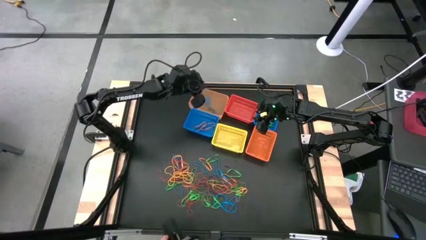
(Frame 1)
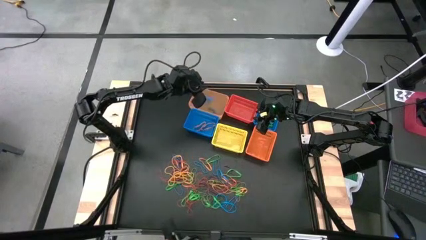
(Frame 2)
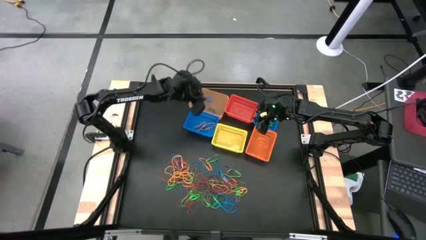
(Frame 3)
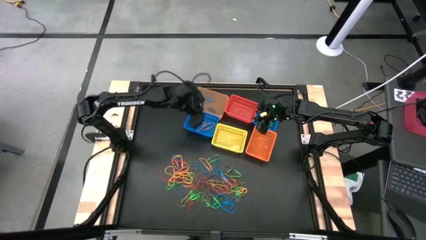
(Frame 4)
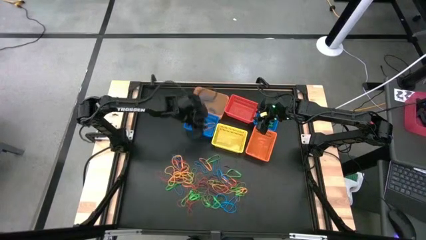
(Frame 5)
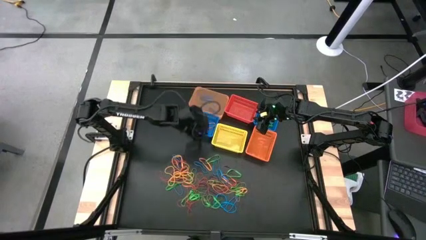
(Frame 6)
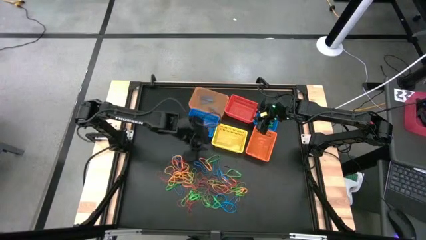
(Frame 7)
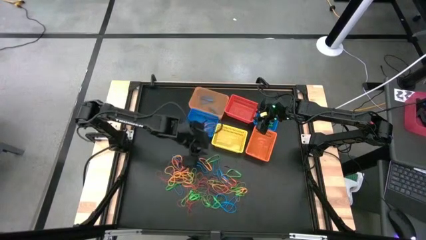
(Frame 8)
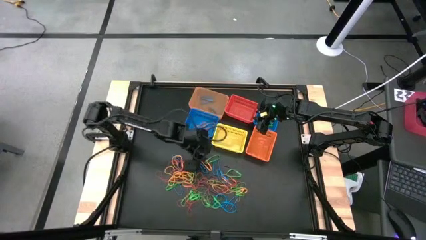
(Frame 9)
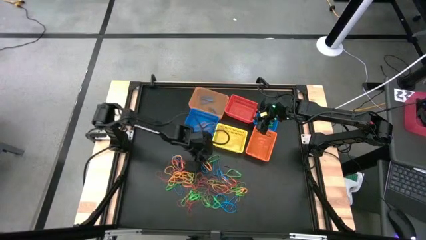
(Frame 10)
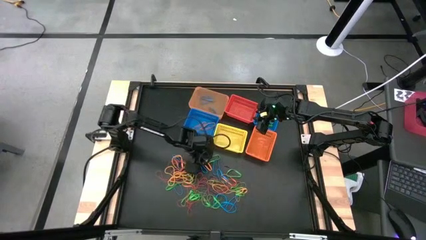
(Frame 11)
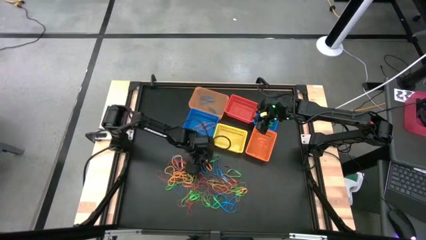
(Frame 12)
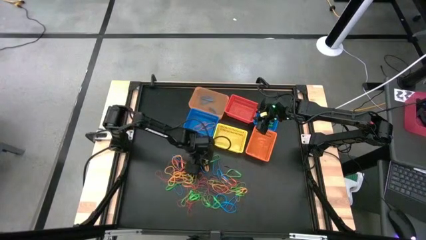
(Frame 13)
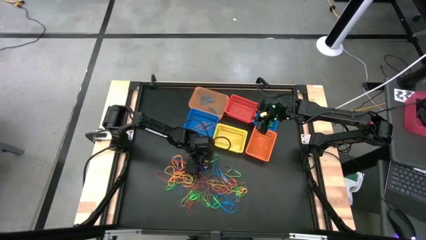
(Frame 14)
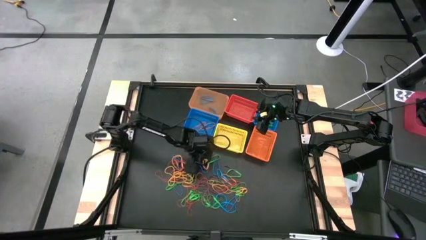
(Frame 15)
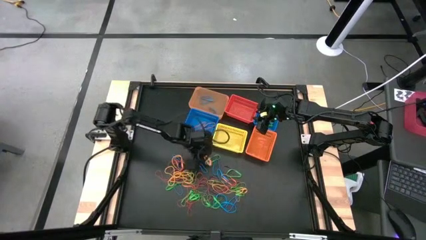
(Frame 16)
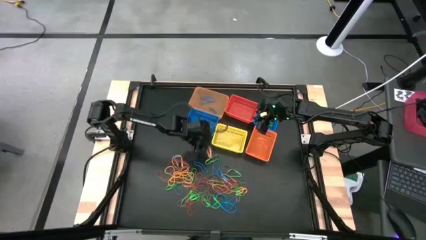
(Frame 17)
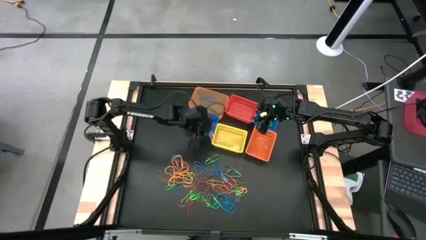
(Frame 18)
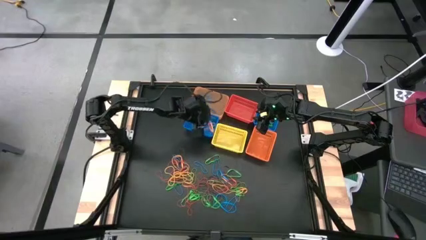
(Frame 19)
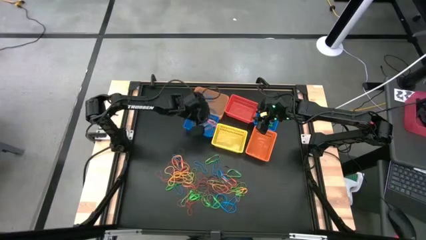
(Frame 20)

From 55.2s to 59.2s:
Task: Sort rubber bands into baskets
Put the orange rubber band into the left blue basket

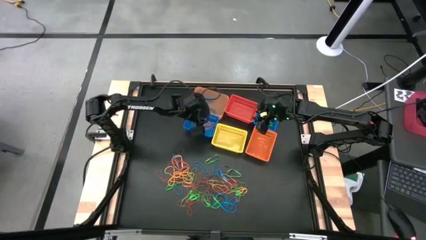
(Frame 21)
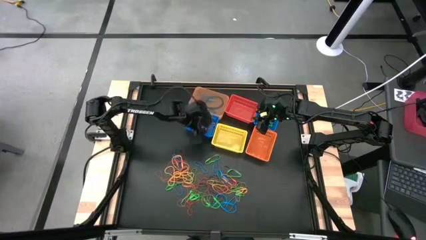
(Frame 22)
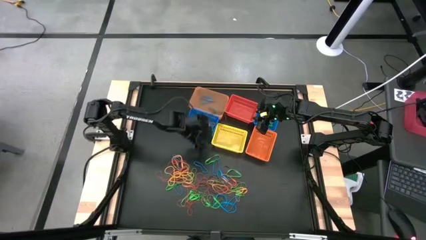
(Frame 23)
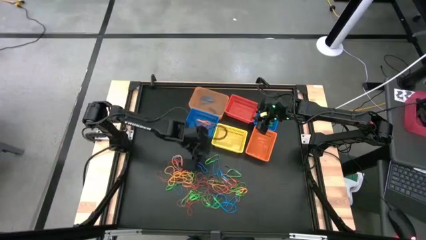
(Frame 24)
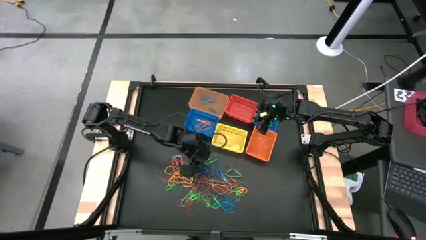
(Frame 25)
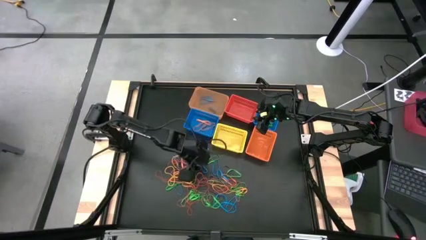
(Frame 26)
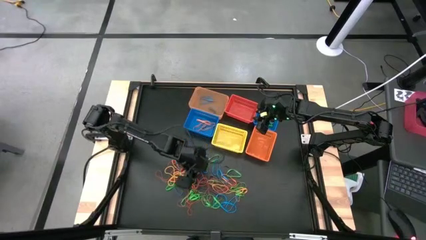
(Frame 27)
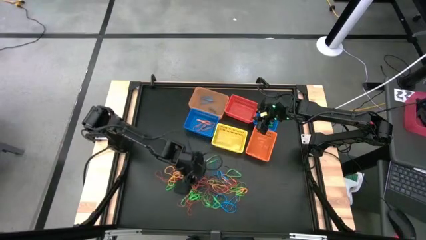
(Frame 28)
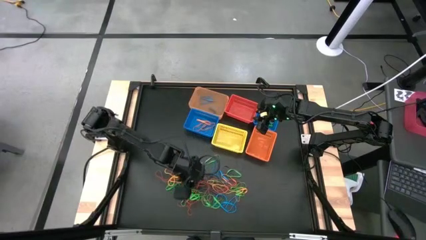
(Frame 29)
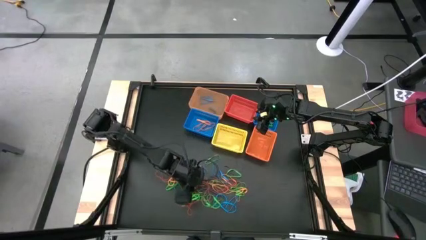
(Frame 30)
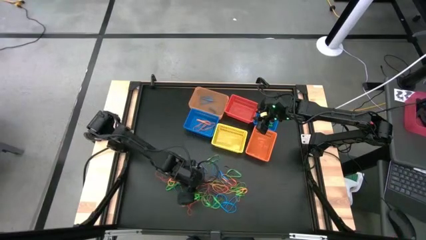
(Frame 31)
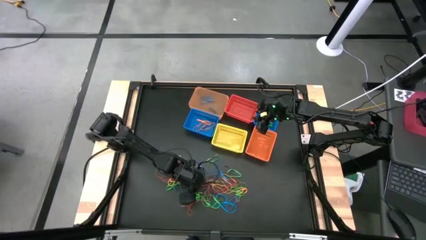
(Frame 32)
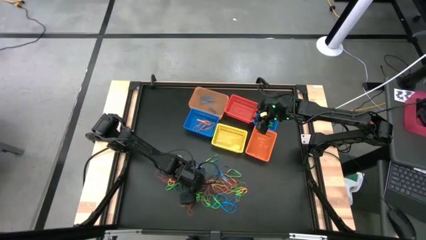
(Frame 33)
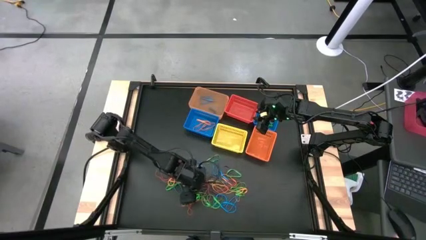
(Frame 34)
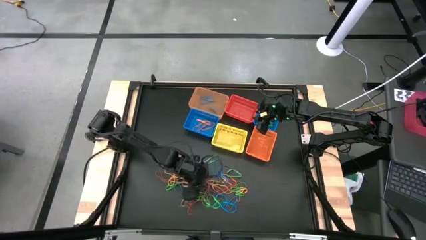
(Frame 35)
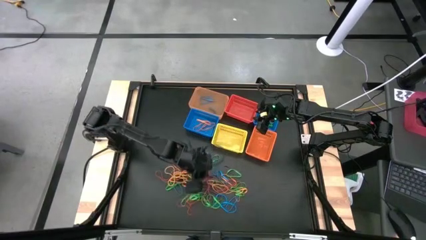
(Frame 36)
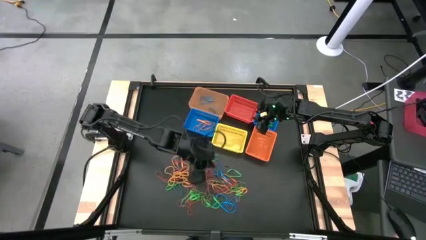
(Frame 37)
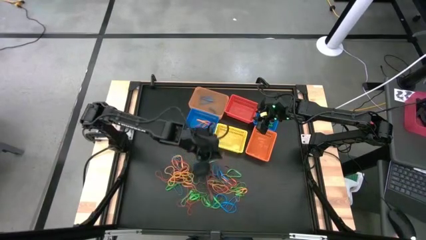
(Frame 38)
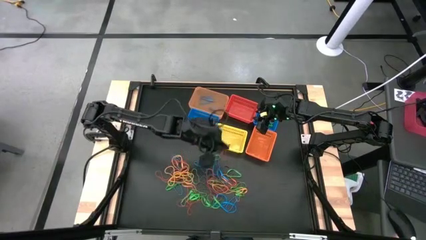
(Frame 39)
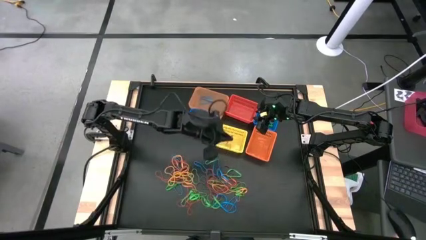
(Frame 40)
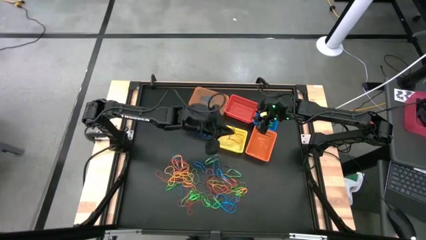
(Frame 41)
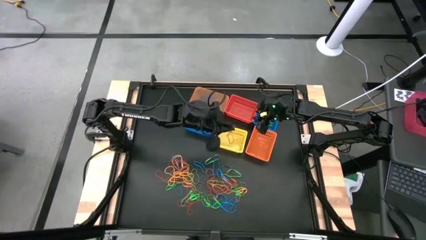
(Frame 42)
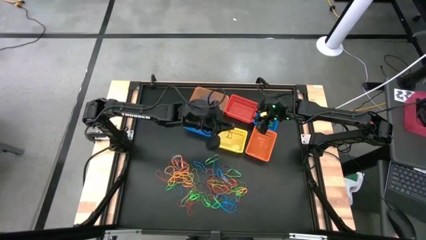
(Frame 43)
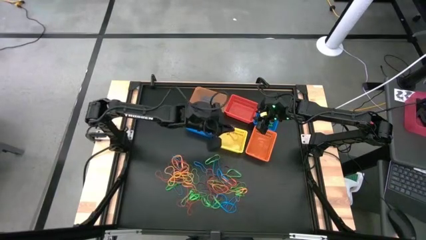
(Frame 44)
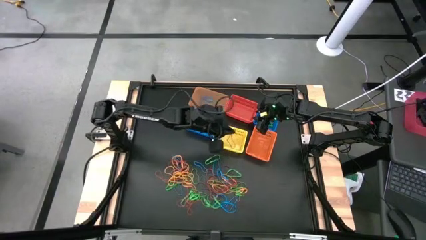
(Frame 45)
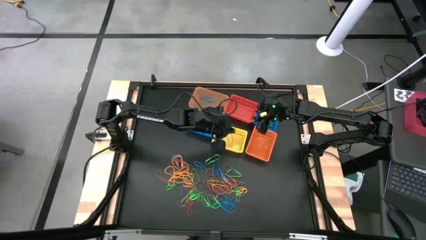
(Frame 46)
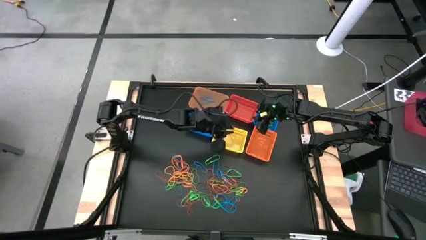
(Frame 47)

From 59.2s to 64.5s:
Put the red rubber band into the yellow basket

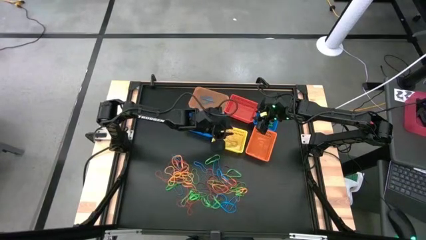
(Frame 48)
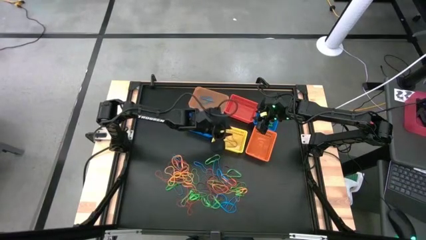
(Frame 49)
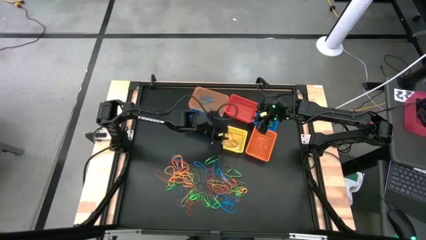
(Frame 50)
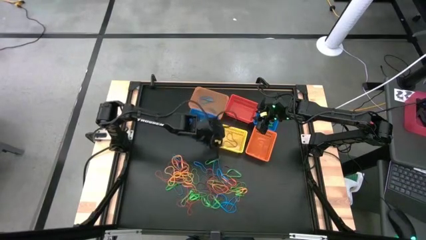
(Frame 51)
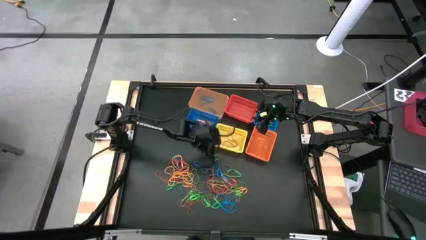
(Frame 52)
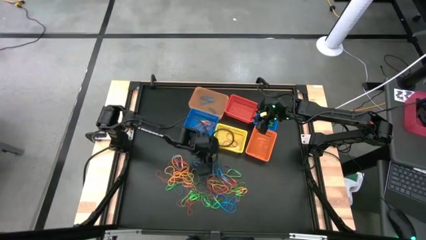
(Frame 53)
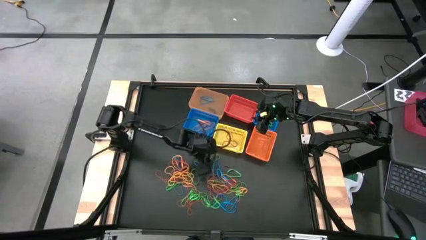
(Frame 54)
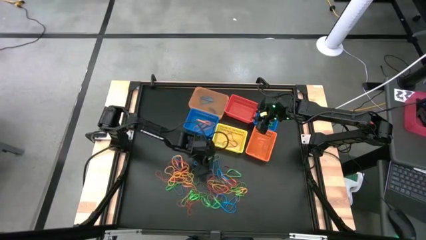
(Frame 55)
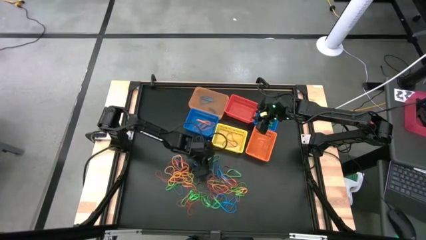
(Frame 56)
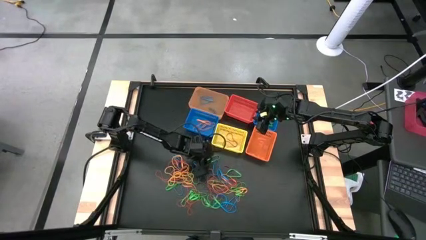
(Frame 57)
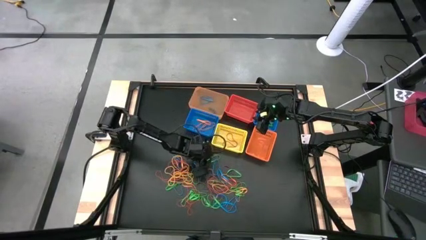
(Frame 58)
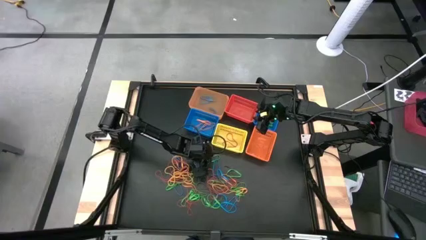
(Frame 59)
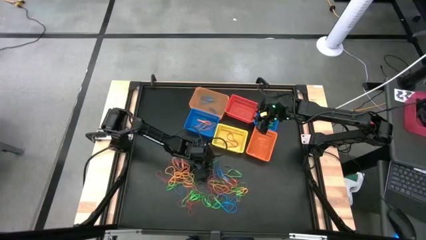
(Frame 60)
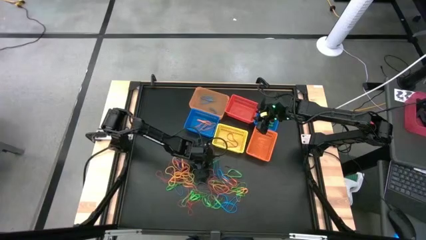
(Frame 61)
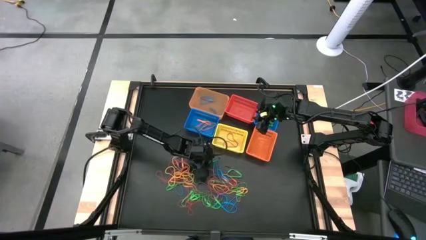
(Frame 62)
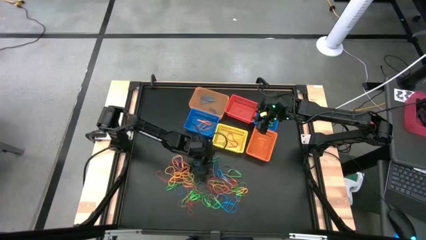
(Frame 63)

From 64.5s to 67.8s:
Put the green rubber band into the right blue basket

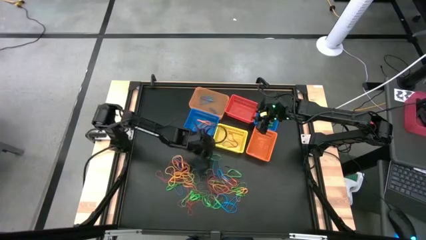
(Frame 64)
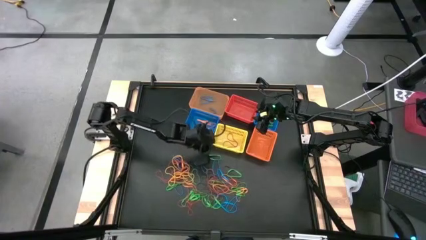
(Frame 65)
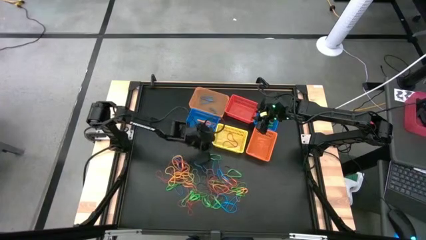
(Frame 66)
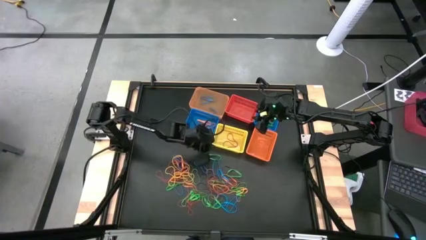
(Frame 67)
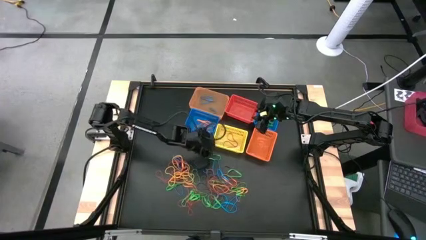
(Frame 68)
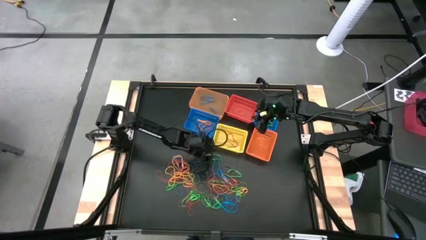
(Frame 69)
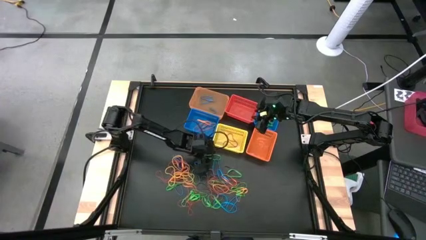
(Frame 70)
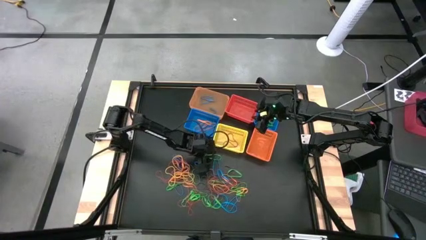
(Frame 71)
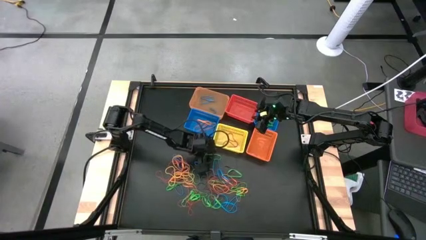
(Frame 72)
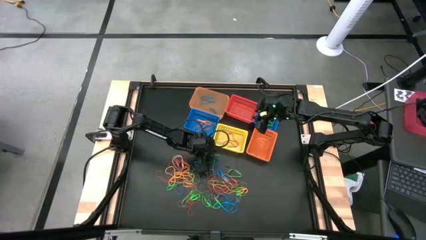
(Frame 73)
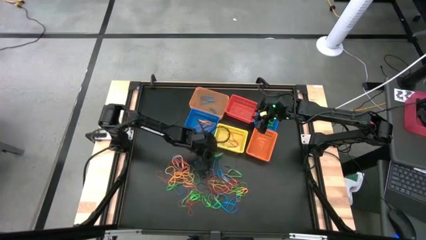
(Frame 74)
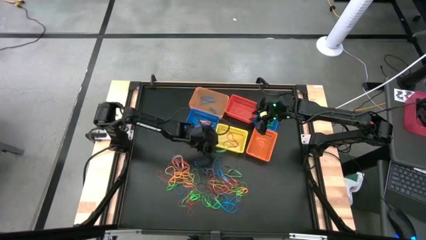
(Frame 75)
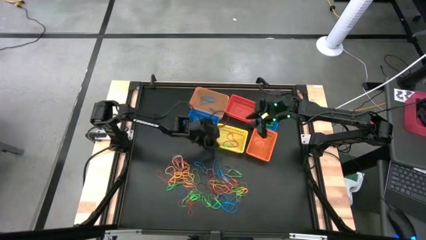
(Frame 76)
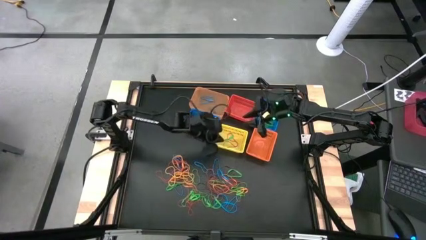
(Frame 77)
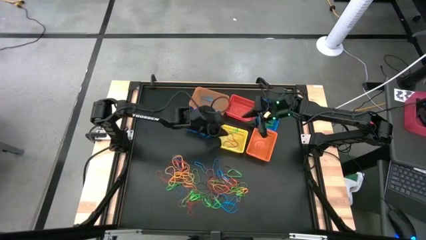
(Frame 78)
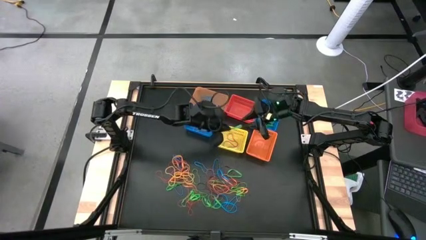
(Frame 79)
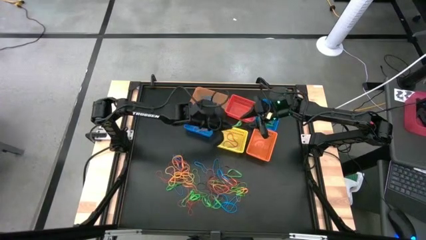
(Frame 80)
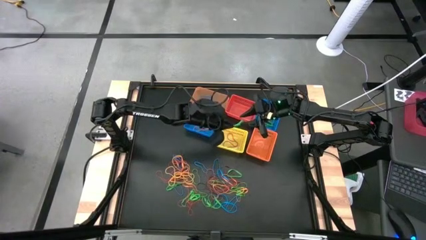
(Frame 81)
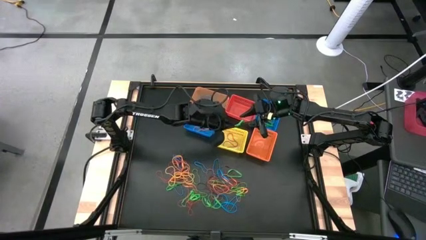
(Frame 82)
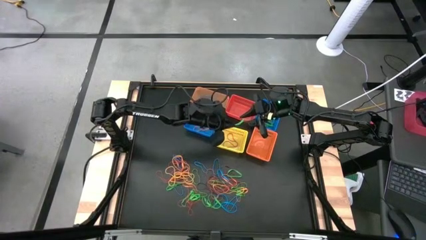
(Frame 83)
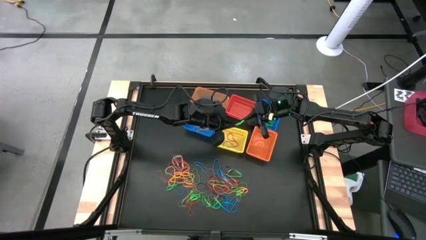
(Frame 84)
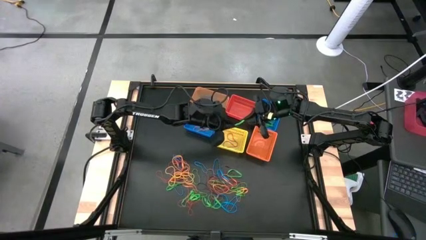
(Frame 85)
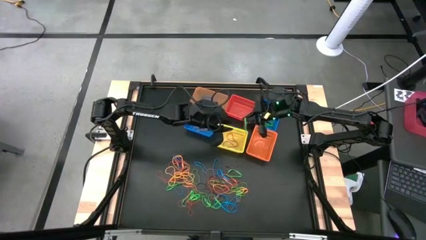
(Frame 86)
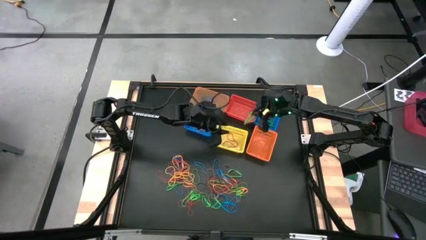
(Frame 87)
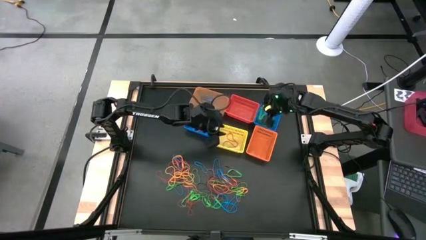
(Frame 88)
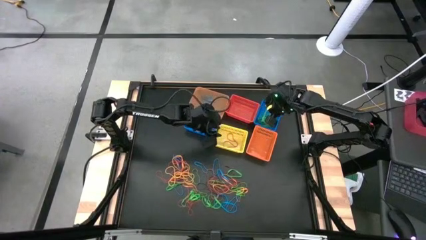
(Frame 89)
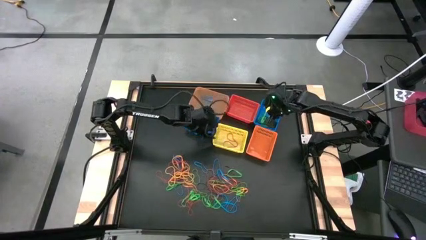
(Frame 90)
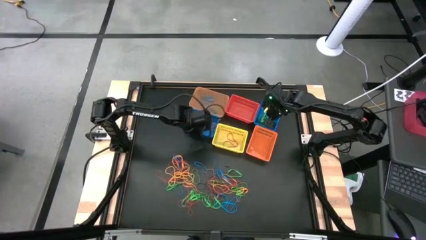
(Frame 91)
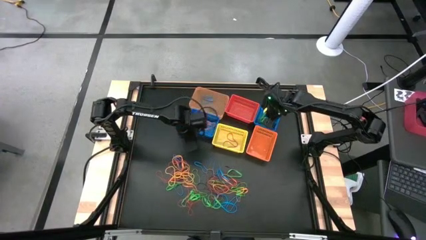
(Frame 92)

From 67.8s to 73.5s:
Put the green rubber band into the right blue basket
